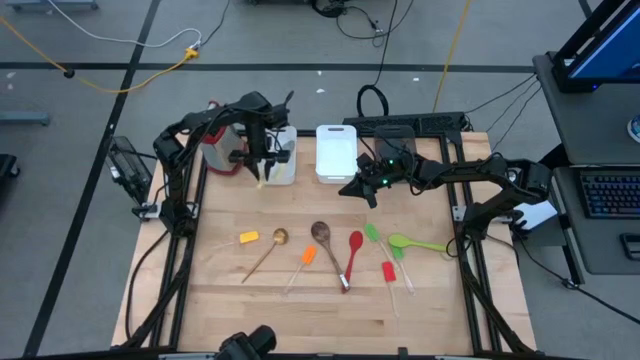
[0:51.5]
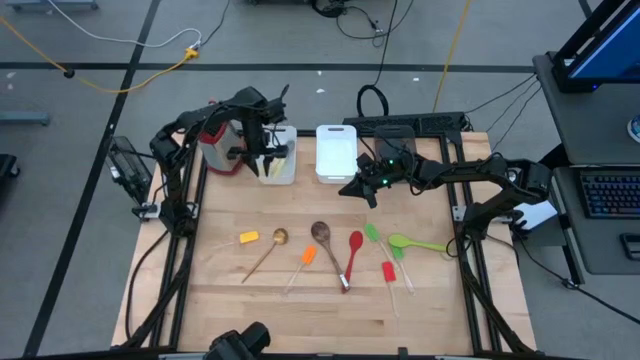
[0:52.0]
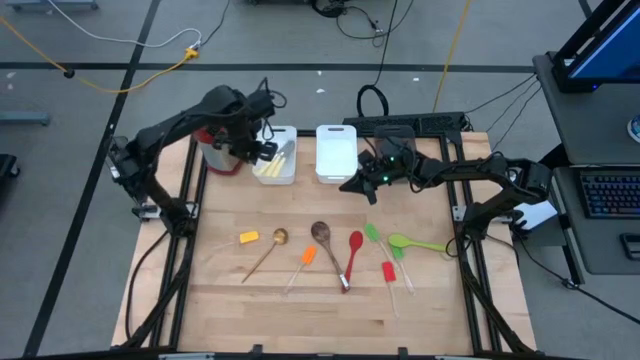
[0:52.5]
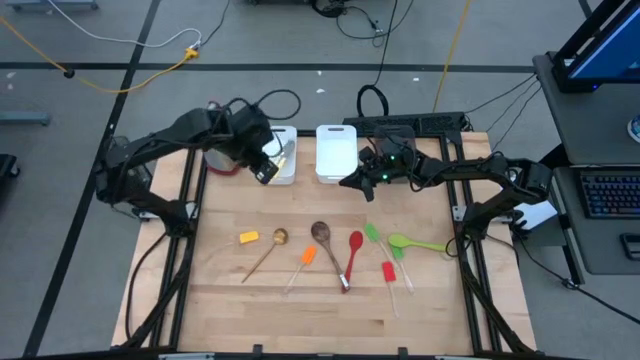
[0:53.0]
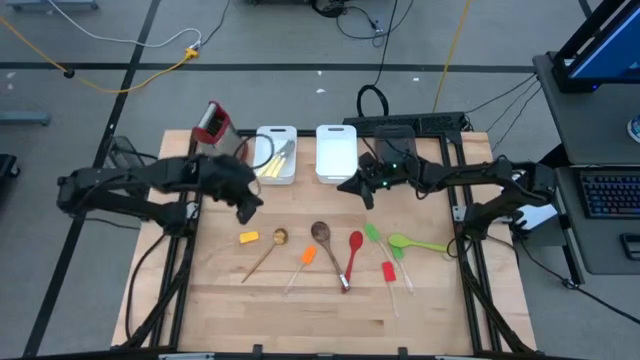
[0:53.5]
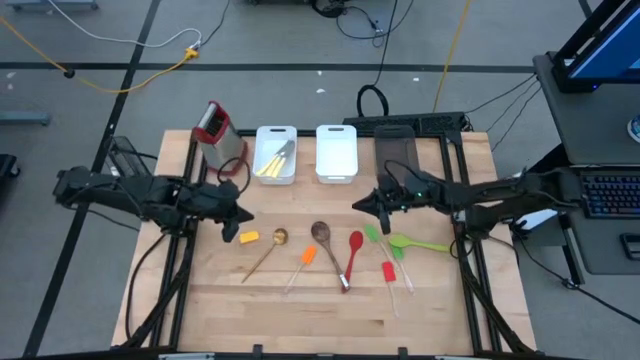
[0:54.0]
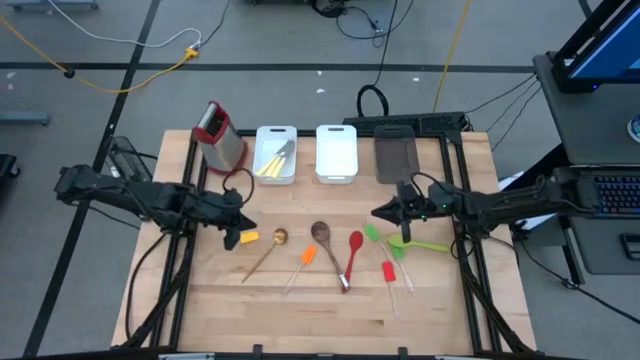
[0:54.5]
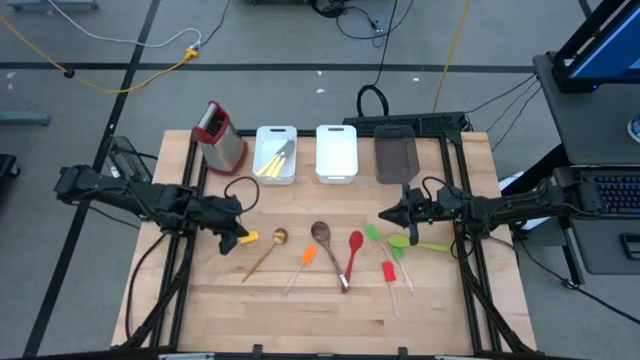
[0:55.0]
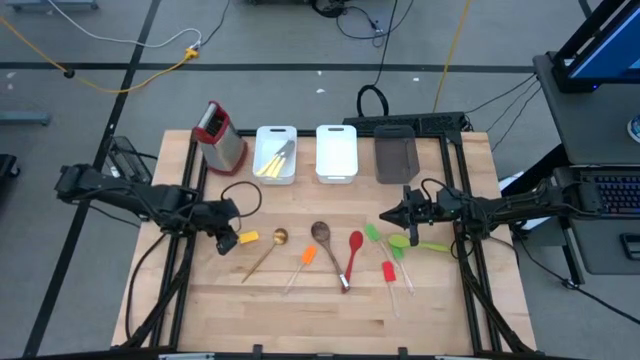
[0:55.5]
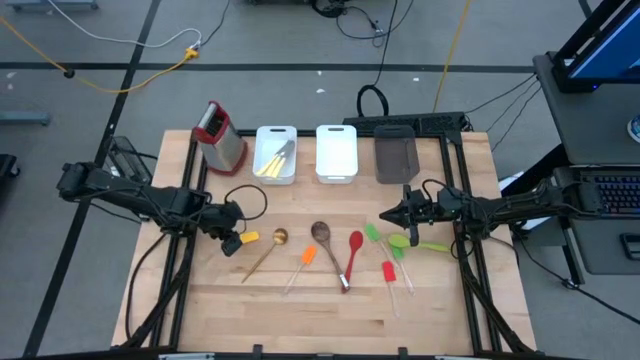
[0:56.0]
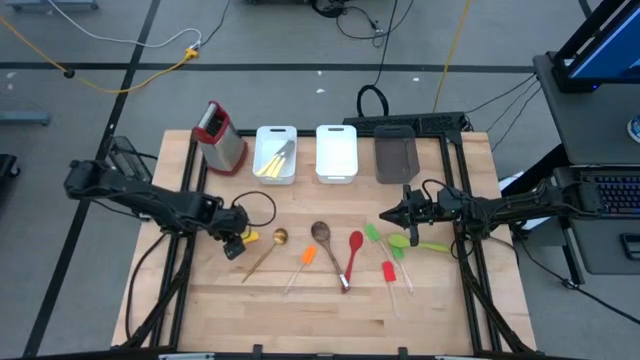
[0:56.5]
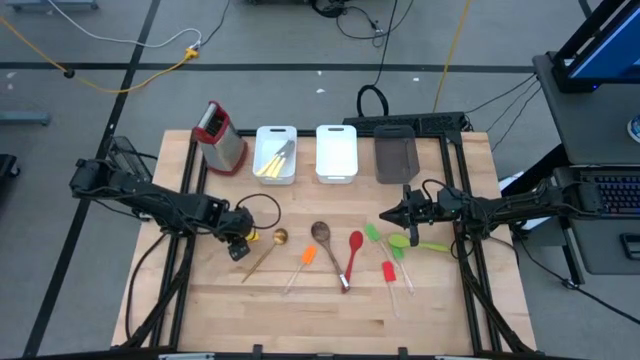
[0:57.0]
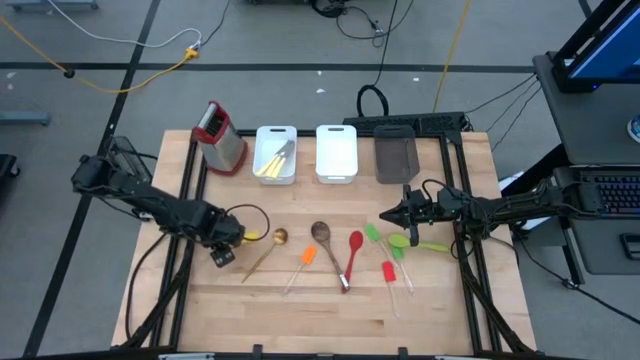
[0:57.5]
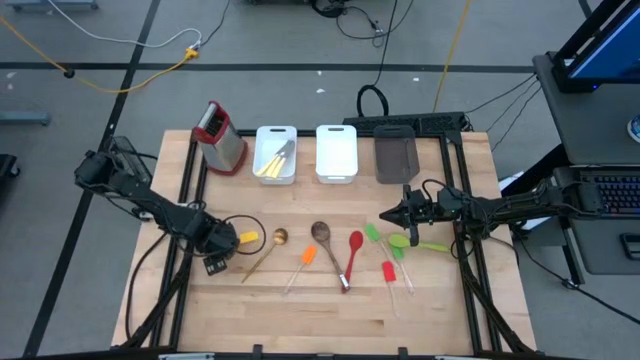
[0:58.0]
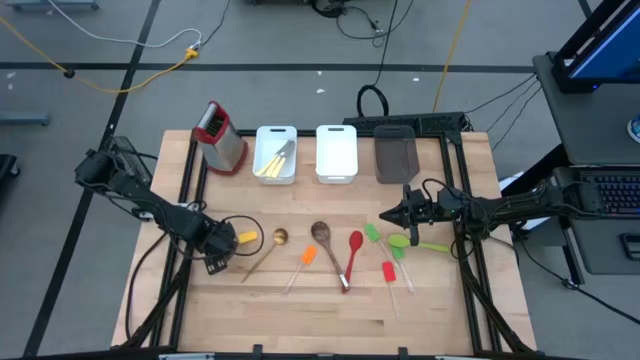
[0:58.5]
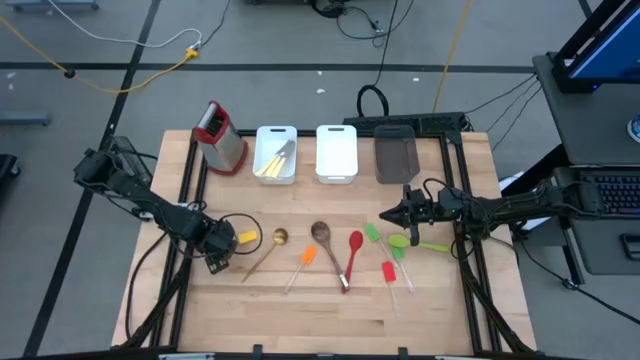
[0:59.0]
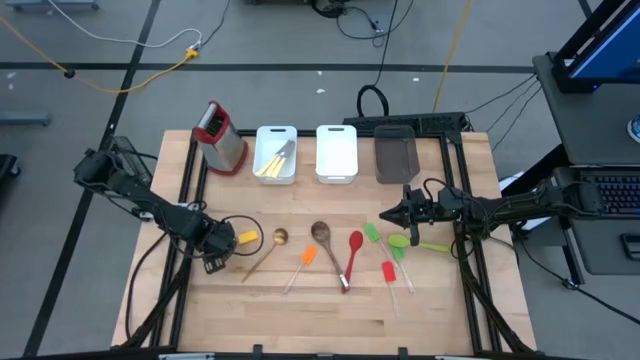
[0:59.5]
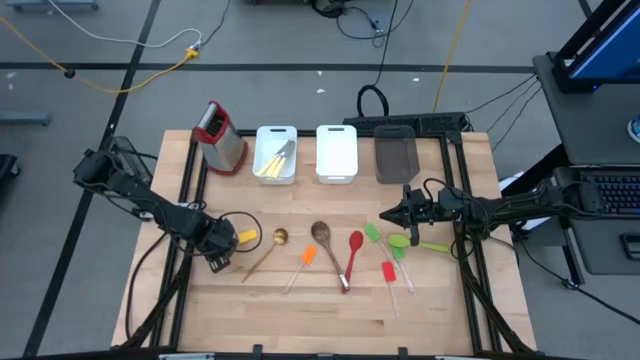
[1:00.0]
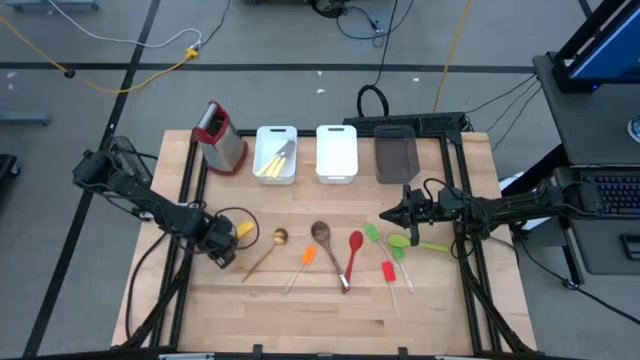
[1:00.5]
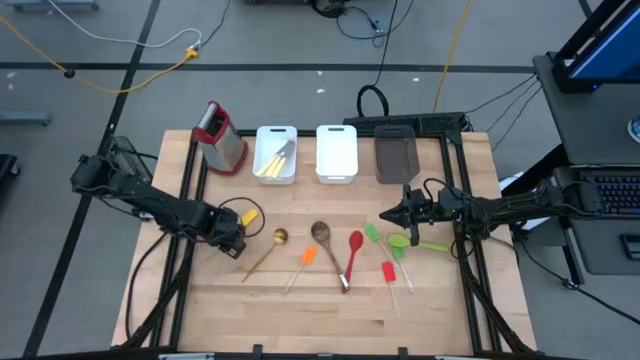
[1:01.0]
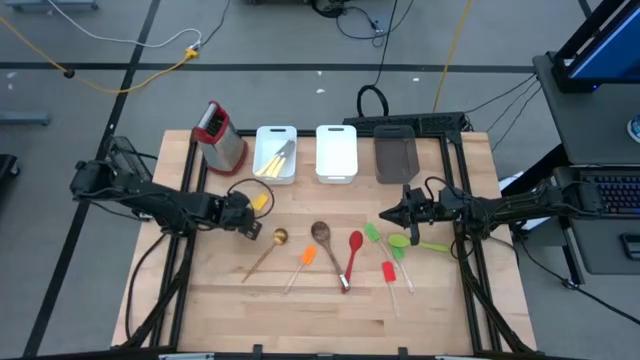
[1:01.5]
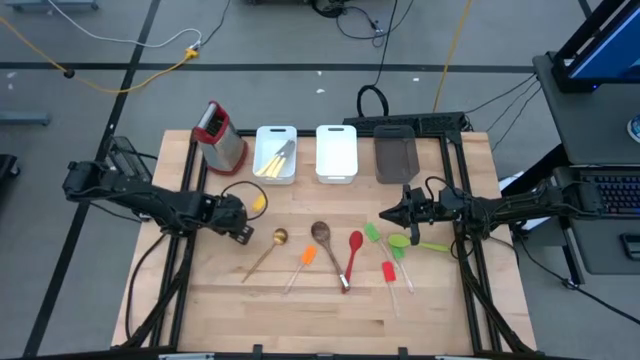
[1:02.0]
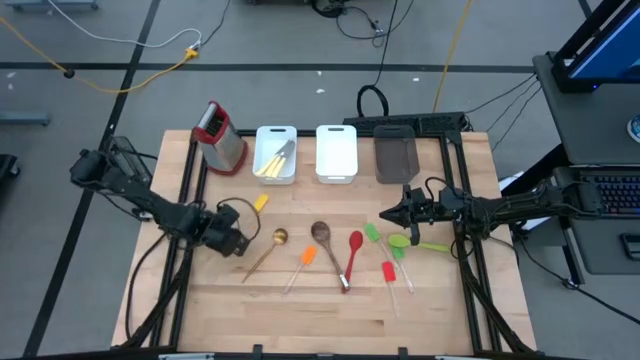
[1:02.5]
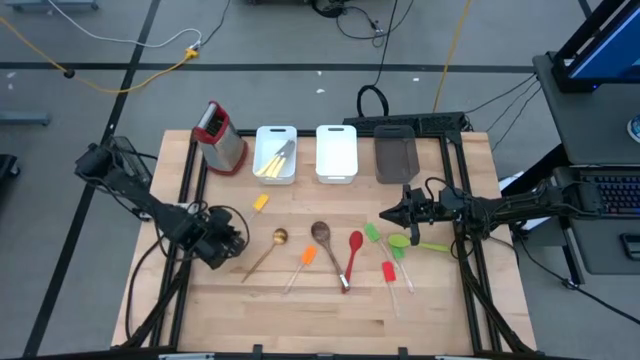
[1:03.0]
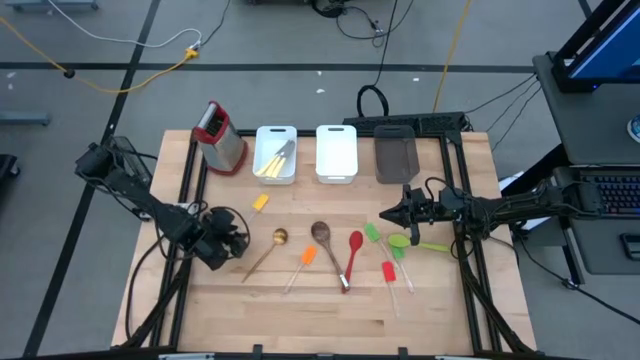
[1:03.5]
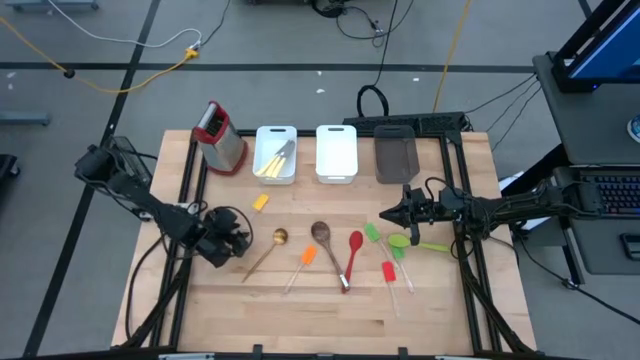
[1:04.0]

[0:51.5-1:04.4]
Task: Pick & Place Kitchen Items
Put the yellow spatula into the black bin

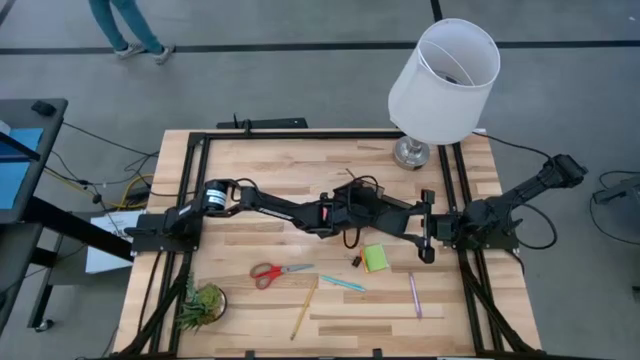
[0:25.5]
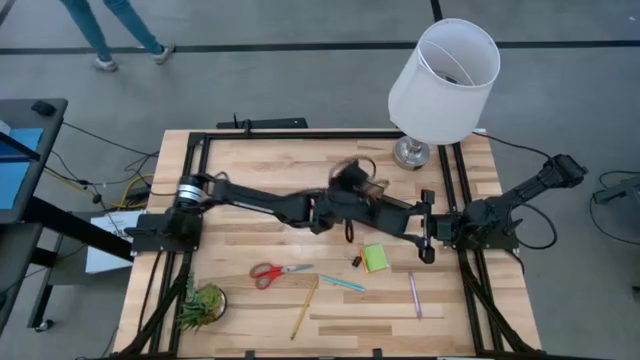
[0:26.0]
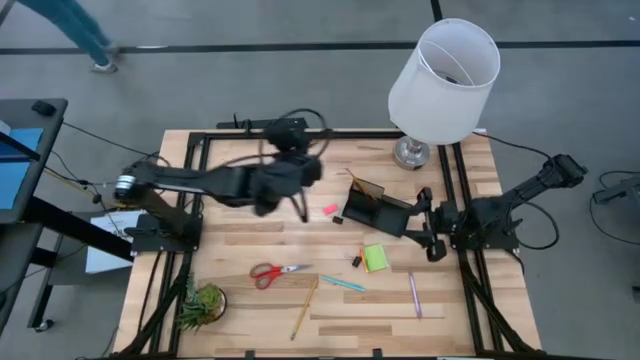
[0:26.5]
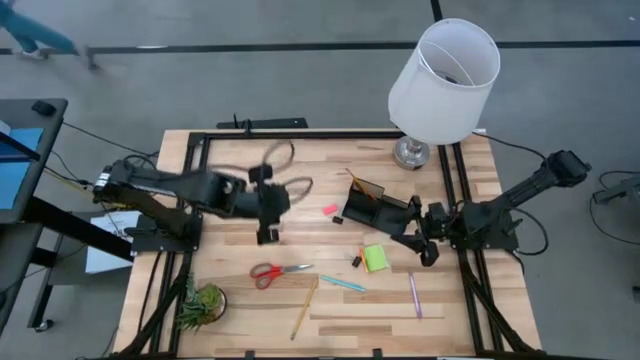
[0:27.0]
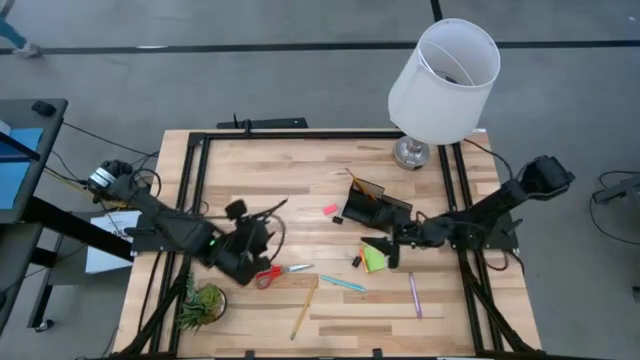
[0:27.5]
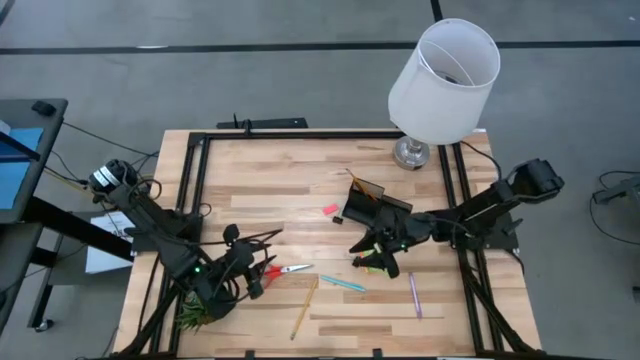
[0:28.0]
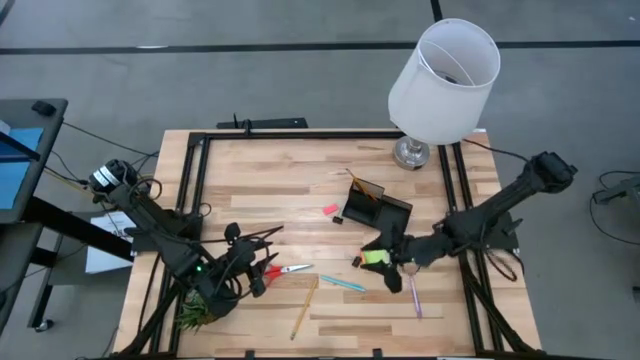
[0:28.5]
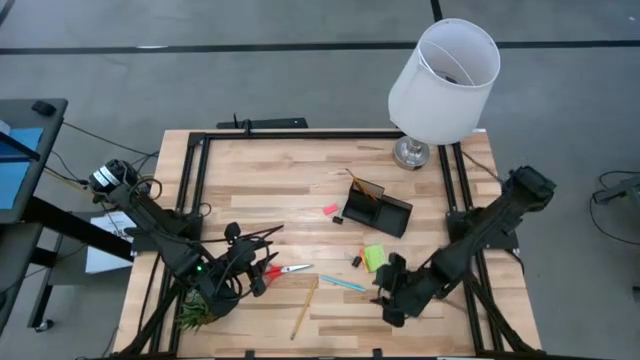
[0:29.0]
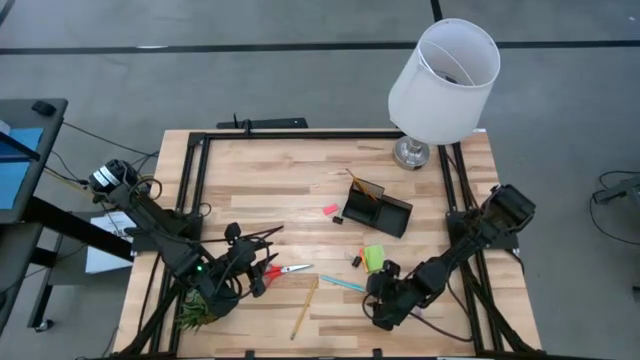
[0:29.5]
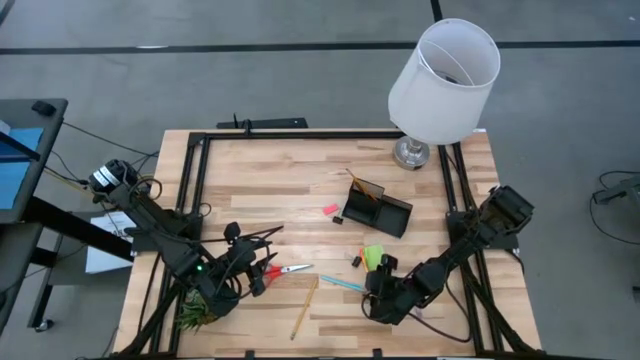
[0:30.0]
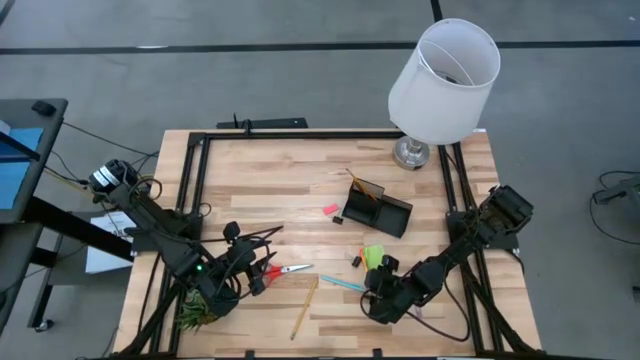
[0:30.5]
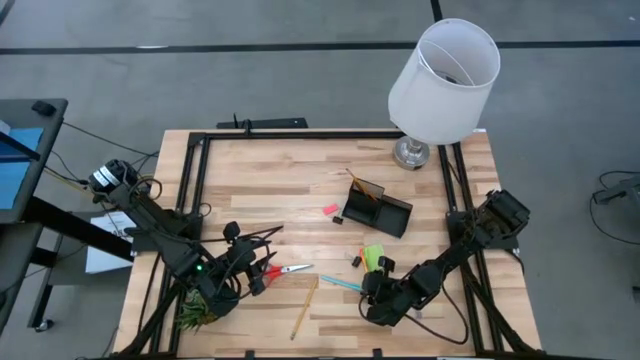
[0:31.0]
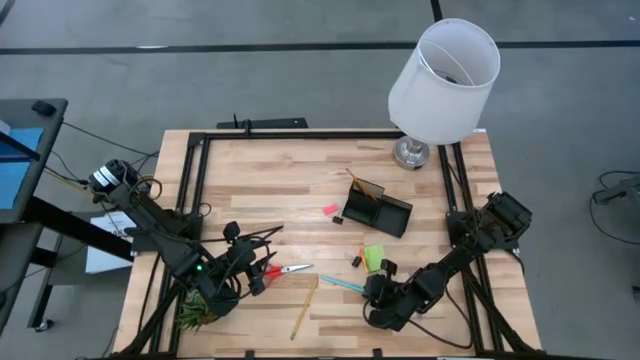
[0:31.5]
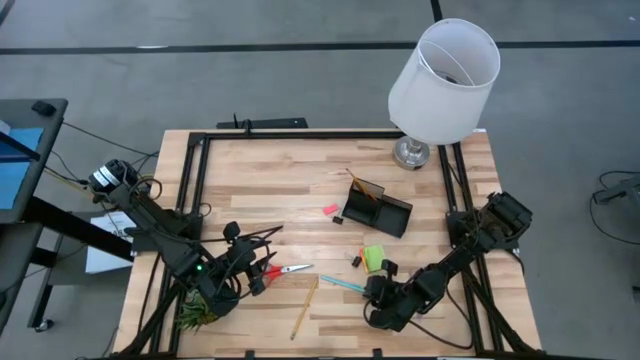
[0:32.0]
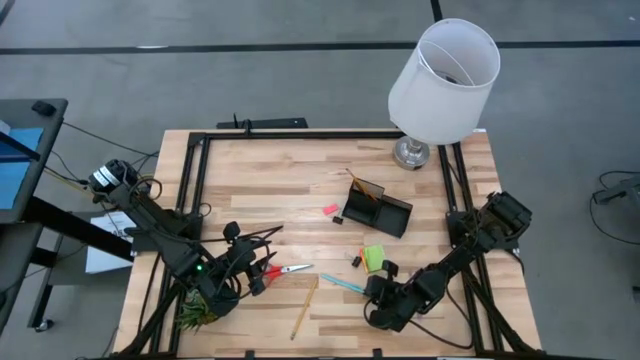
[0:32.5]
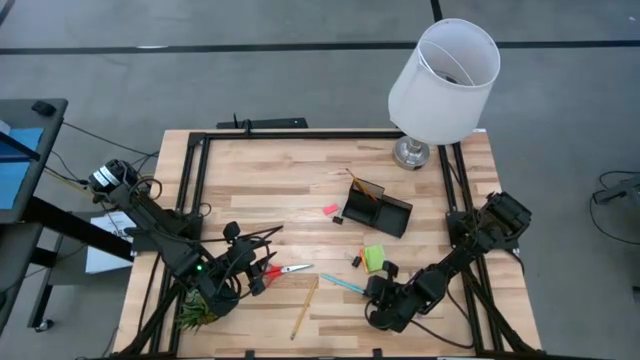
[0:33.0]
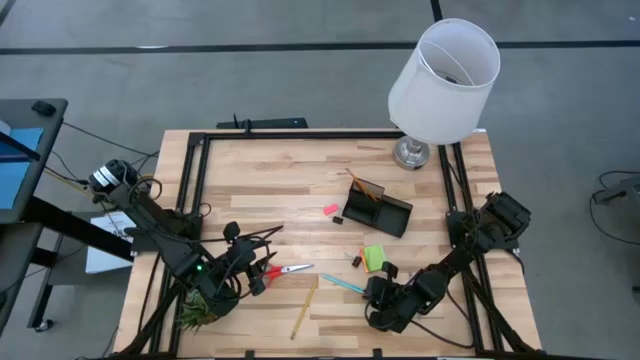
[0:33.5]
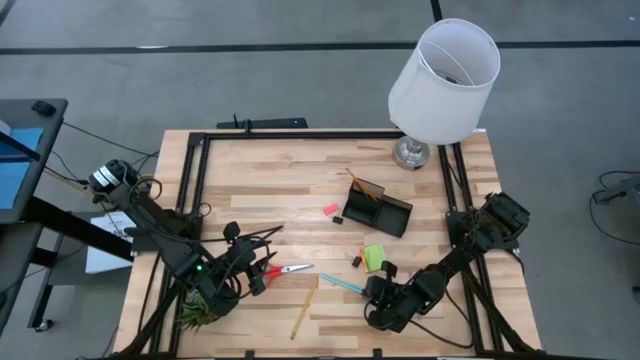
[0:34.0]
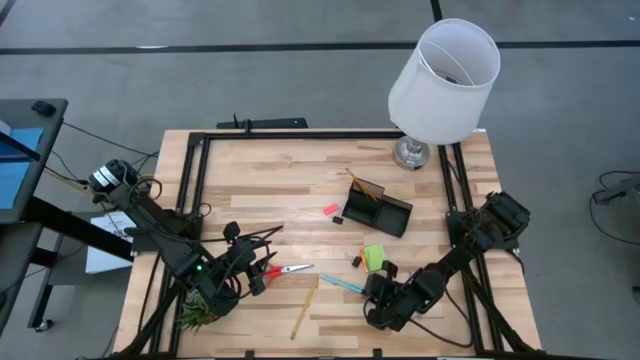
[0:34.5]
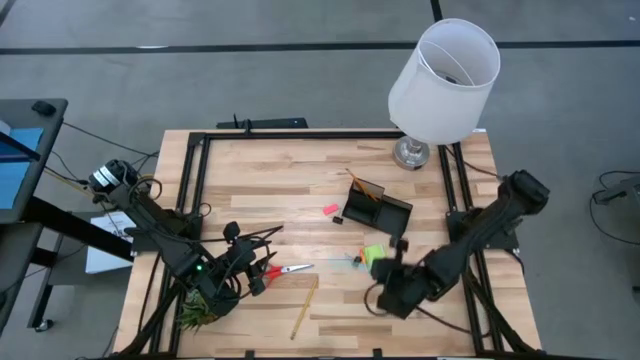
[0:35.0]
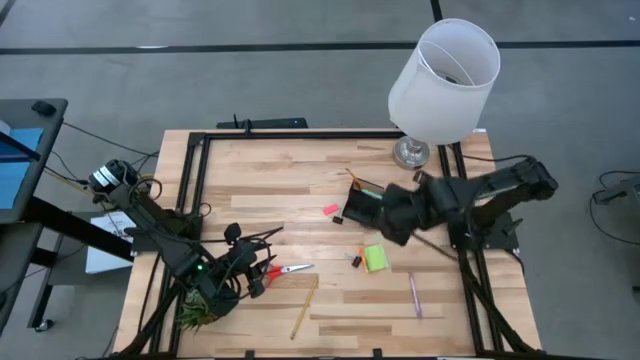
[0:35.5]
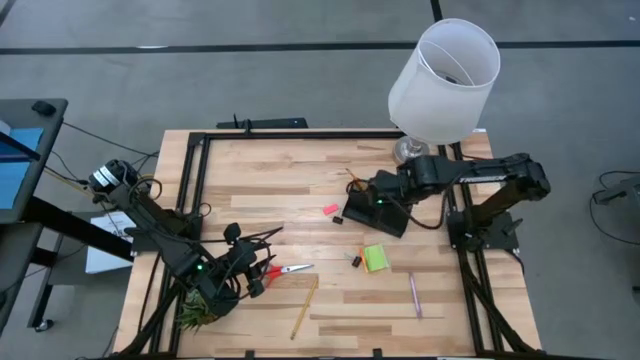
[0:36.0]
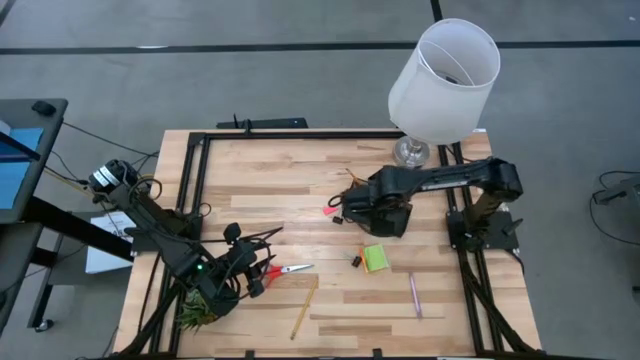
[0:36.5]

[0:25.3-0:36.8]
Task: Pick and place office supplies into organizer
Put the blue pen into the desk organizer
